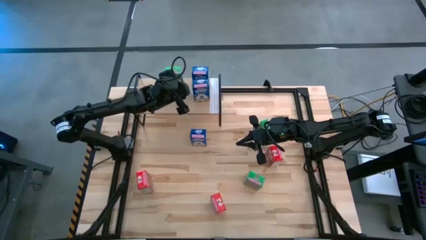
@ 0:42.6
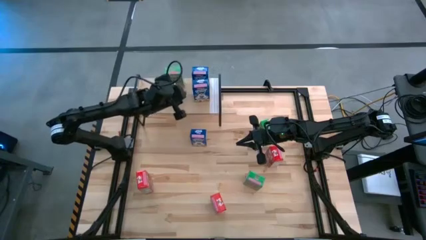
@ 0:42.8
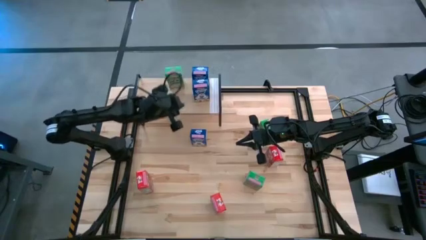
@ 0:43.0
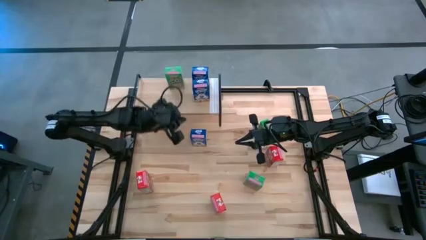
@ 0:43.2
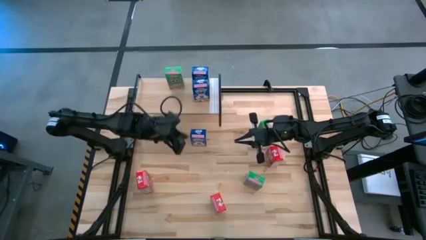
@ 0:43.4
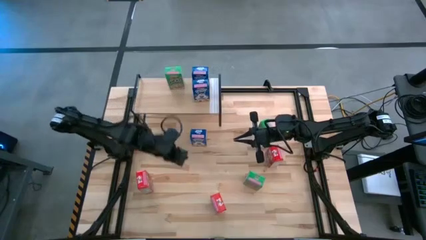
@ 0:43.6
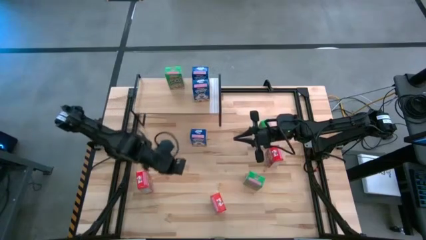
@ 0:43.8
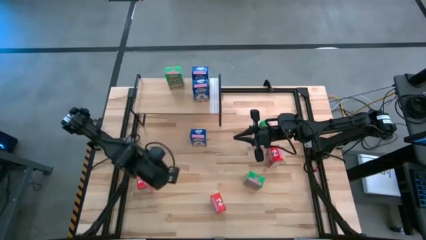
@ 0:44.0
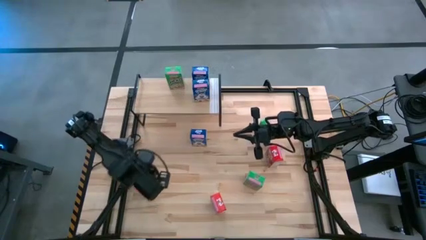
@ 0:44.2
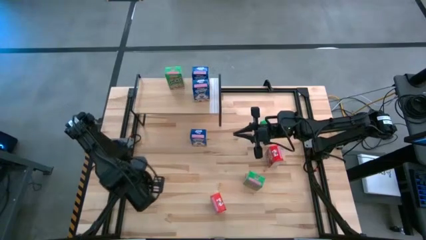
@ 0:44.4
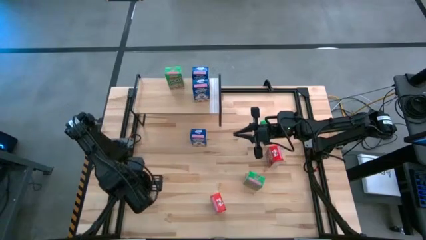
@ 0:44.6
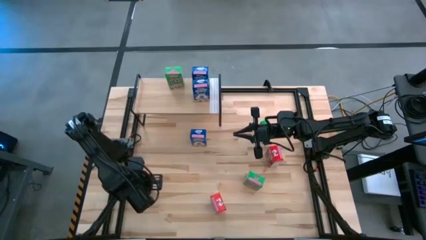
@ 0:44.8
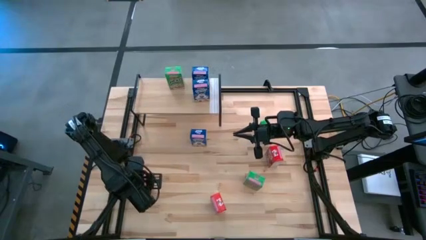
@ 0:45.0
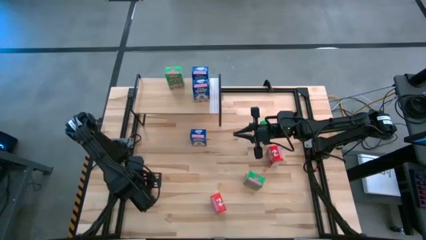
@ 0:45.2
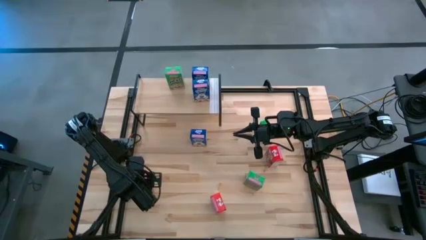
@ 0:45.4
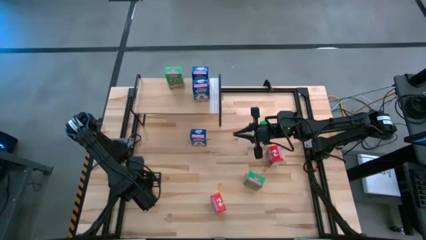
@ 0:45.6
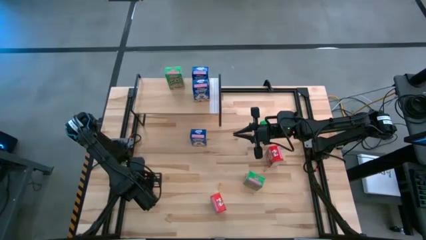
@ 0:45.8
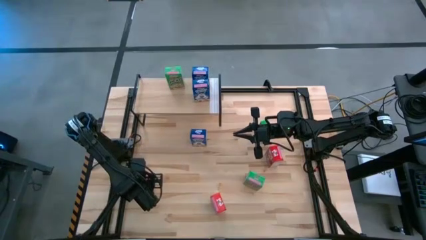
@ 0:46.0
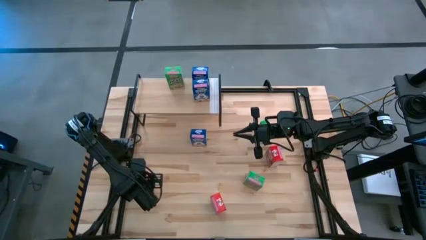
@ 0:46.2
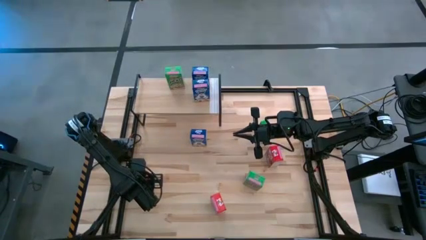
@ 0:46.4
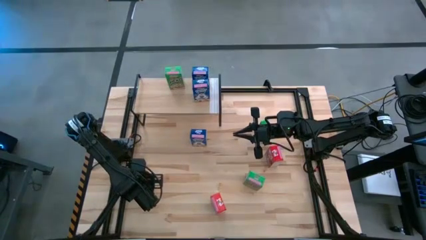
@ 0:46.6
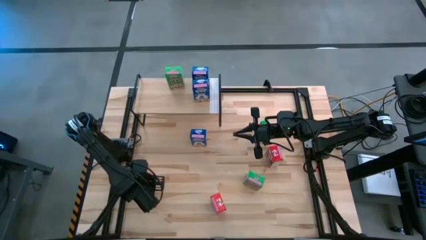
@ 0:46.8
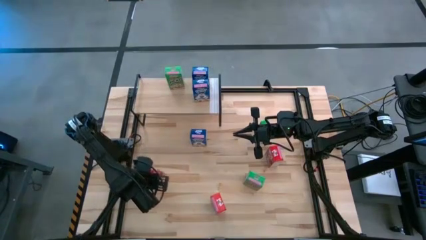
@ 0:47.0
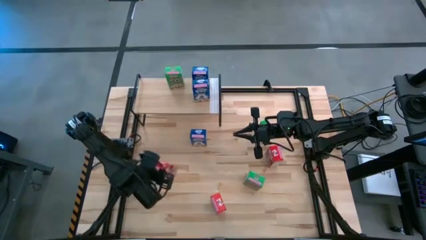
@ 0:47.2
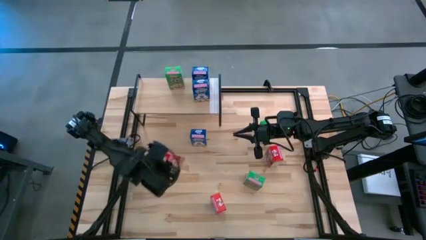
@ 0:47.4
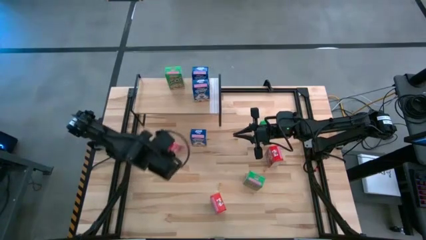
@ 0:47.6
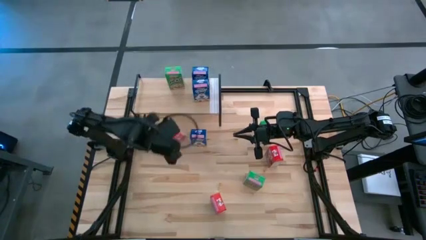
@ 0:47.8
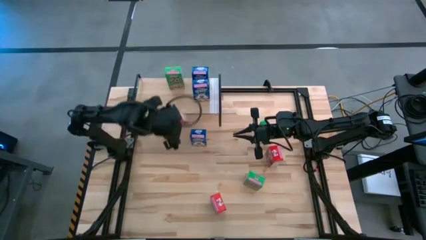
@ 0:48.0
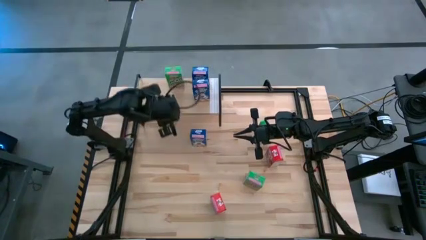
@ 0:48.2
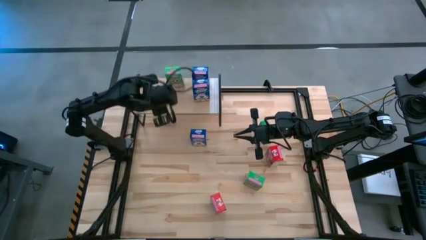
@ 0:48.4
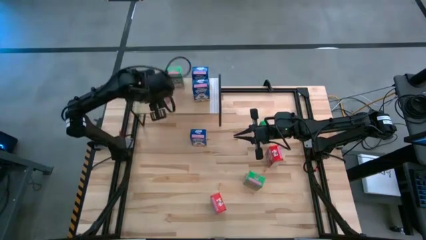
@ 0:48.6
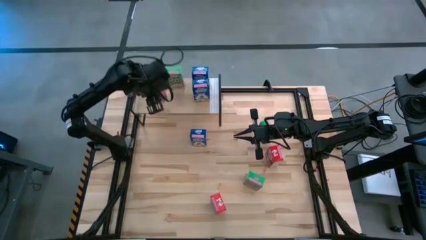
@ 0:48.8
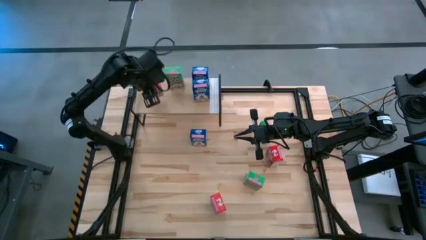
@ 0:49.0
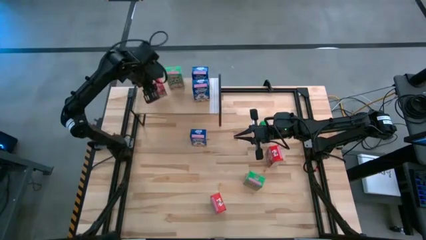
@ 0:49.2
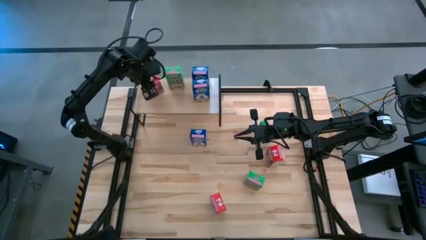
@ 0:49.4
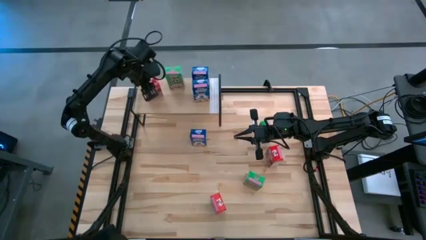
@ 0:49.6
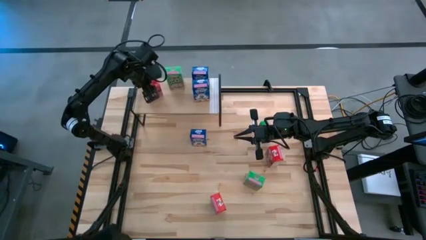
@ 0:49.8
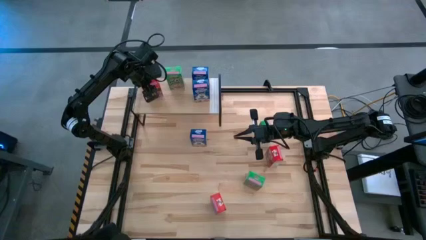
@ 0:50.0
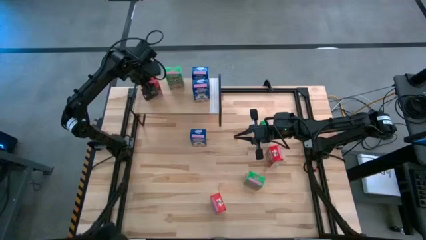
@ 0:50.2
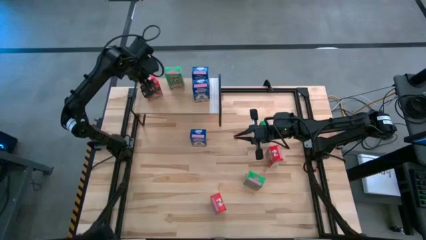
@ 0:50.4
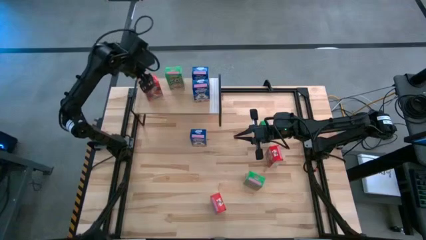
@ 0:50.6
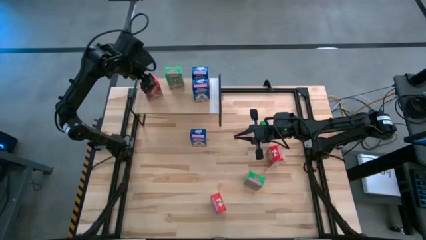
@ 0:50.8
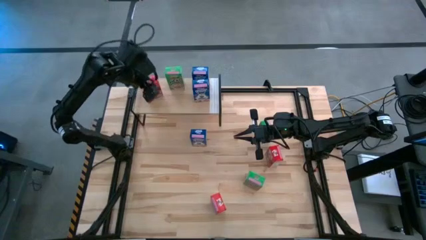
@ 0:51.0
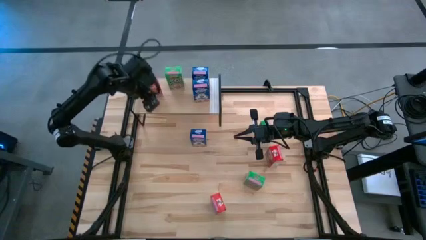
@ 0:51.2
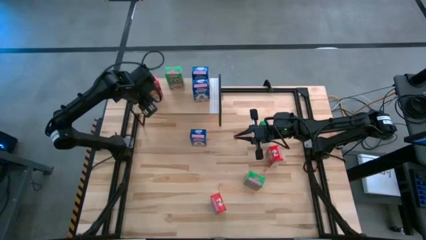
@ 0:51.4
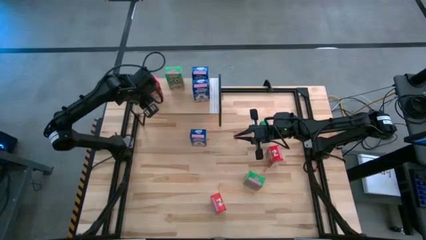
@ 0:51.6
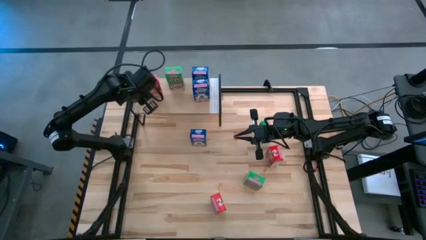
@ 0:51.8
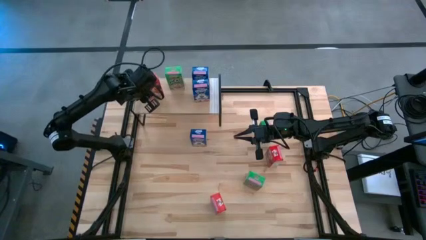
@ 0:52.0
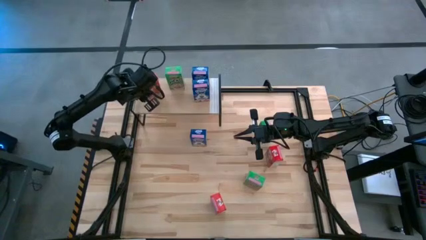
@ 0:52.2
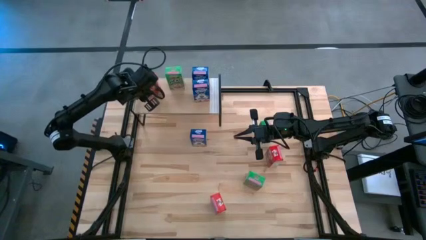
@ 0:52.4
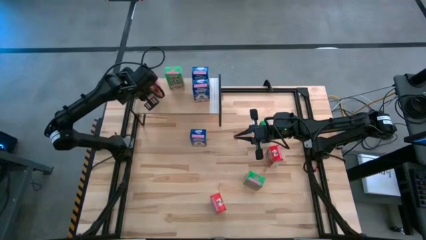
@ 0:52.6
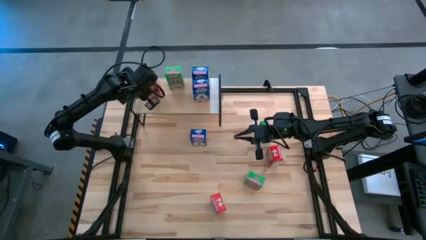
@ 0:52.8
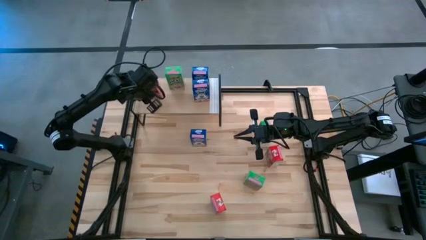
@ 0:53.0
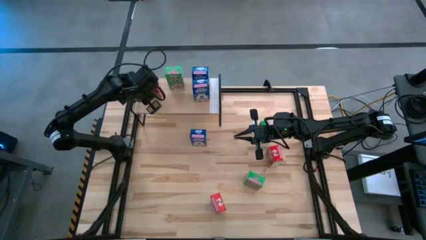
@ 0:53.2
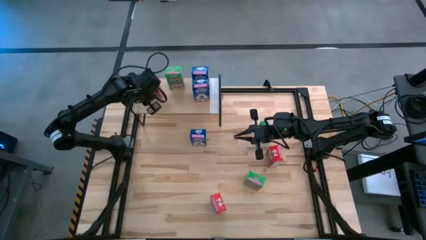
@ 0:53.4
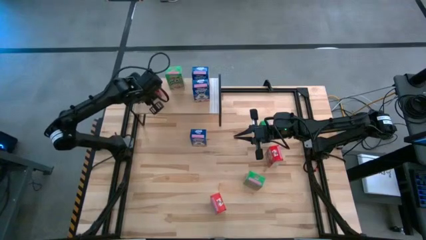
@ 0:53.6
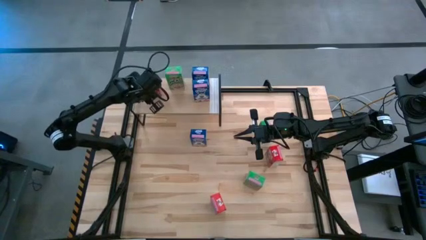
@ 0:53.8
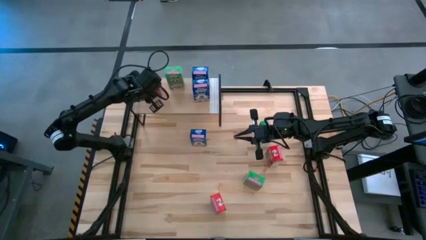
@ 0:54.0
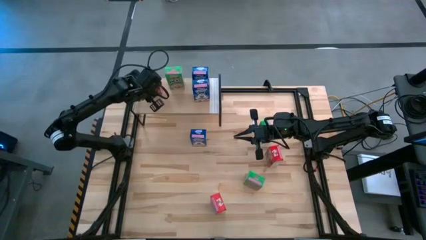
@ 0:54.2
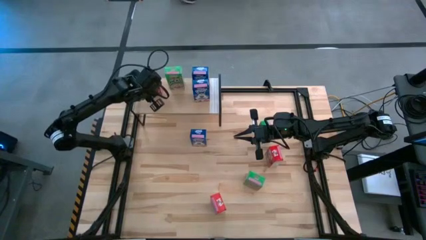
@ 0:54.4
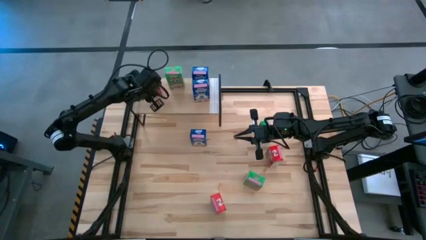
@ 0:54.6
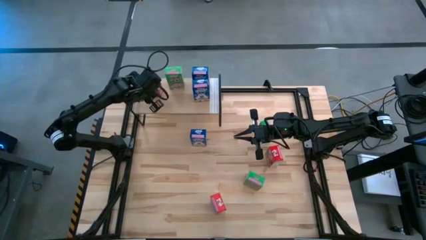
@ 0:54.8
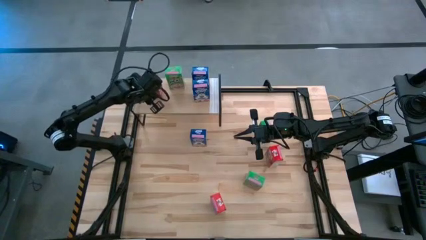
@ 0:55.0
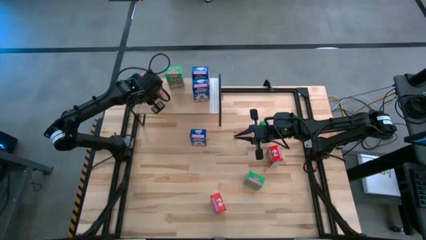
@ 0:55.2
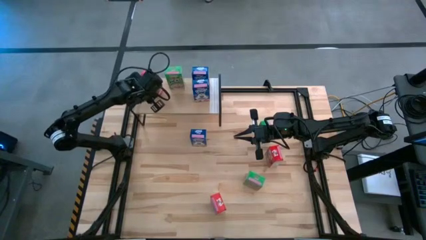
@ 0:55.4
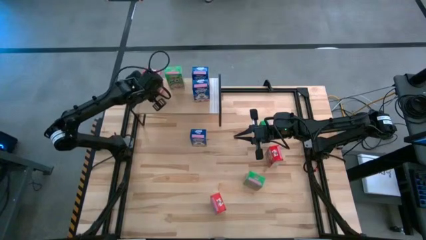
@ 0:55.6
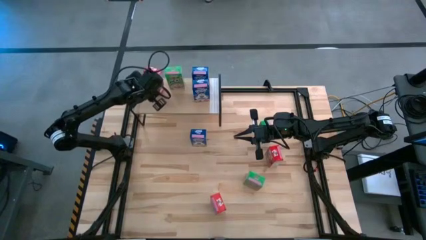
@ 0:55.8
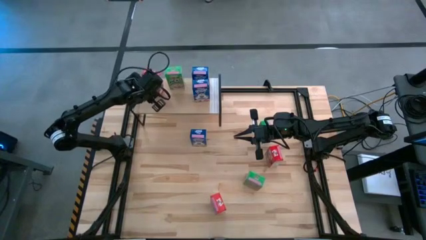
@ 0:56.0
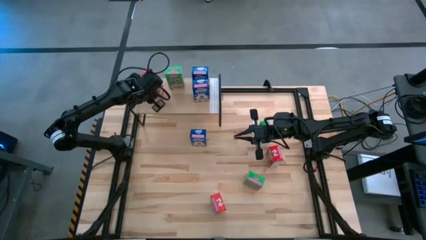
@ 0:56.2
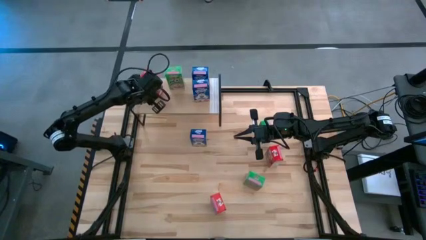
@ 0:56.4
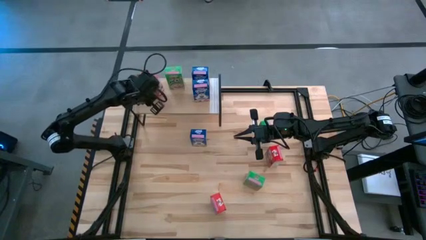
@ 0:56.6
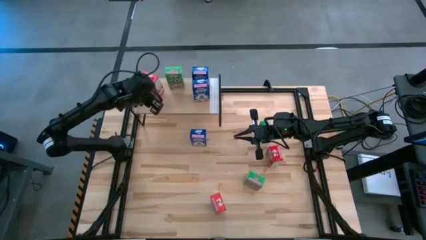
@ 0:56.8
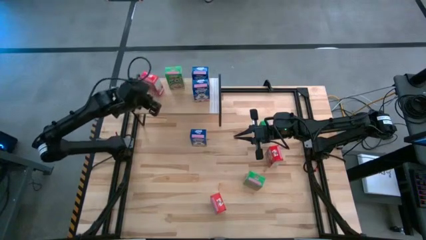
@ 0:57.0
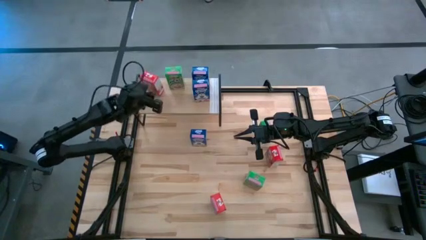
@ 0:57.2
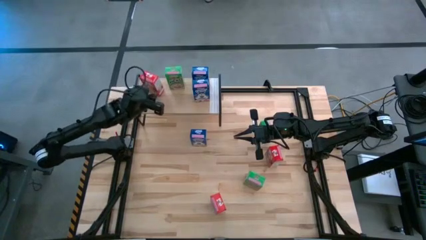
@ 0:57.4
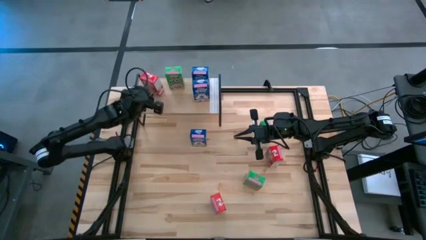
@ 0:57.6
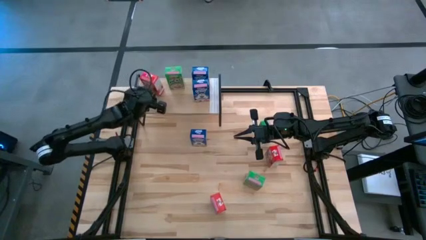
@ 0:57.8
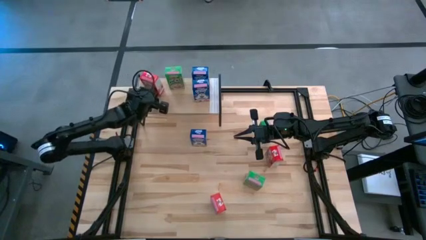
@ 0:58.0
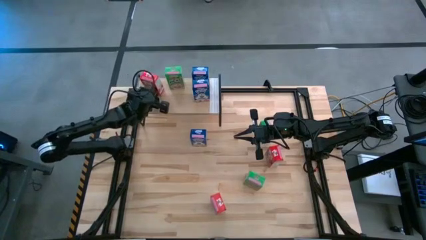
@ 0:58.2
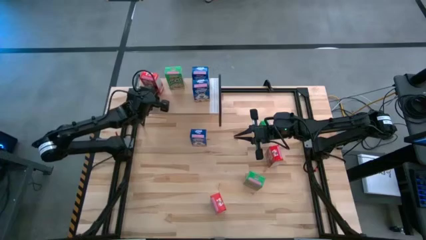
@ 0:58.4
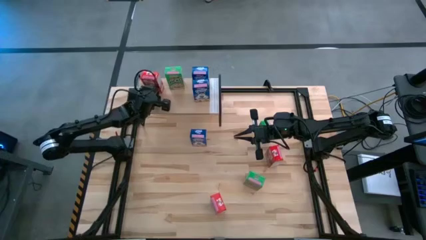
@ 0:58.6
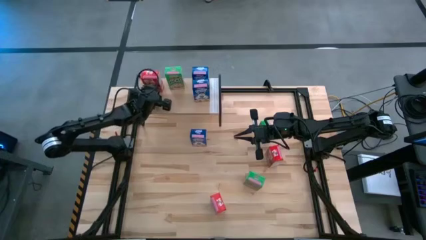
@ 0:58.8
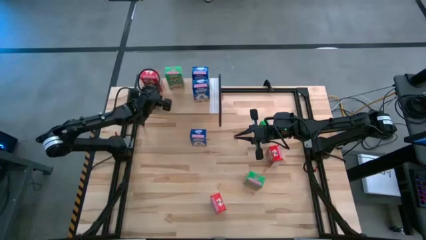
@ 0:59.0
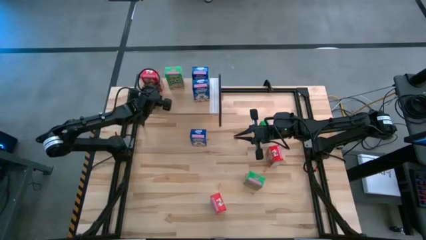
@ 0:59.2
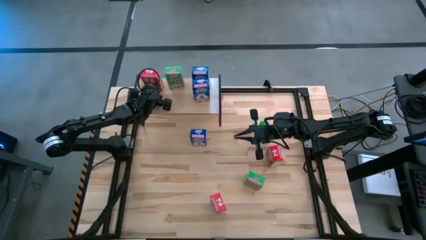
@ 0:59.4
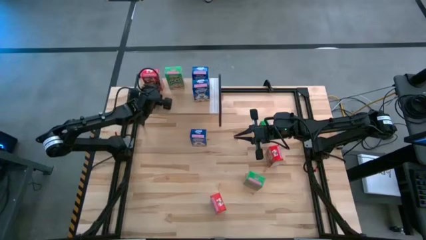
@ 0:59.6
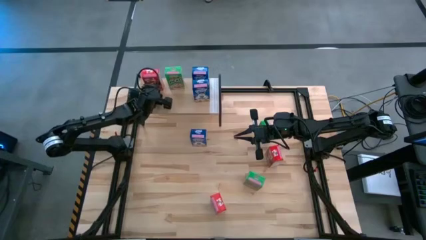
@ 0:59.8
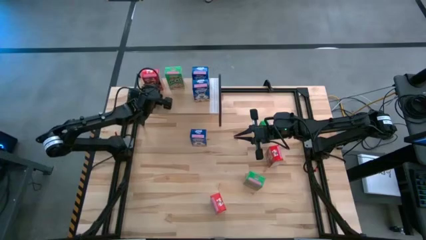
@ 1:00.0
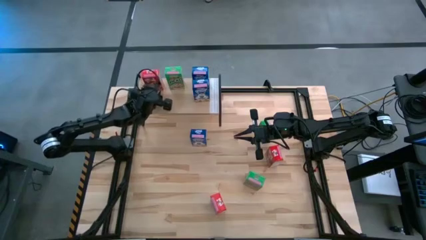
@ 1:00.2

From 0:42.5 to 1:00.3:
Task: Stack cereal on shelf
Put the middle left red cereal box on the shelf
